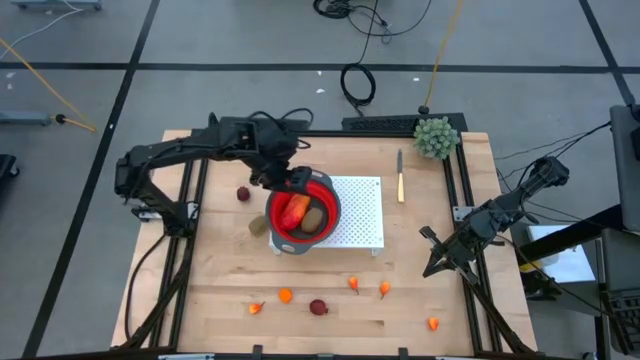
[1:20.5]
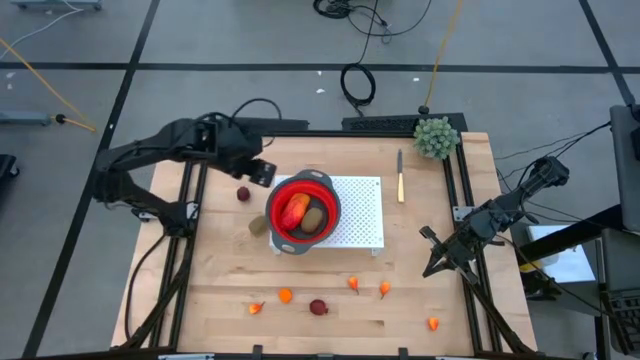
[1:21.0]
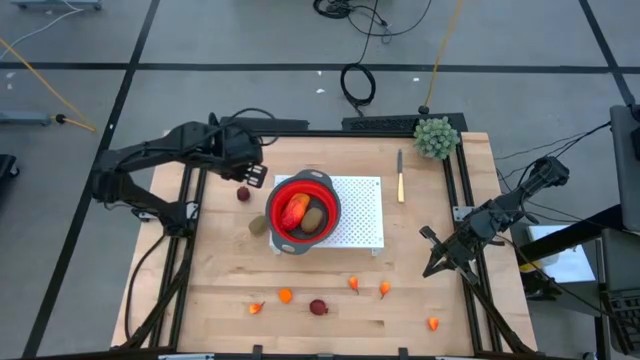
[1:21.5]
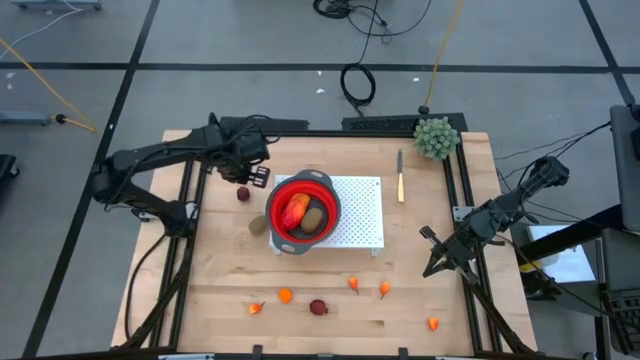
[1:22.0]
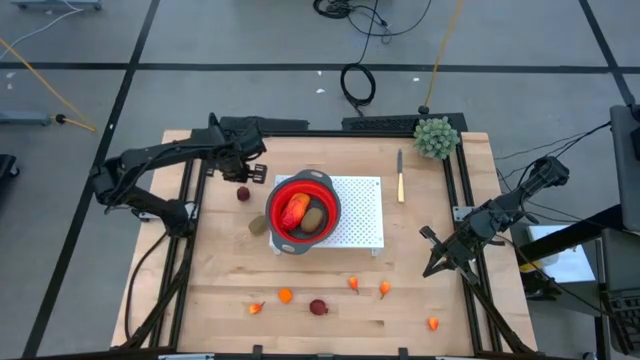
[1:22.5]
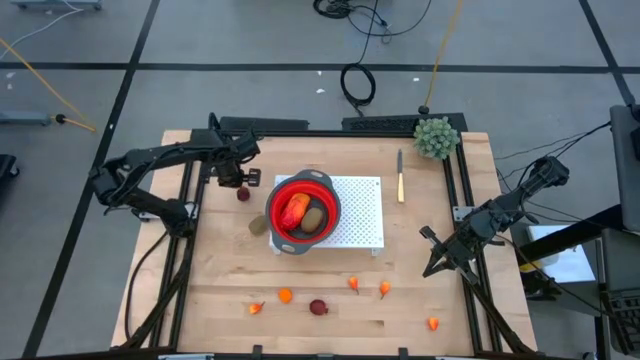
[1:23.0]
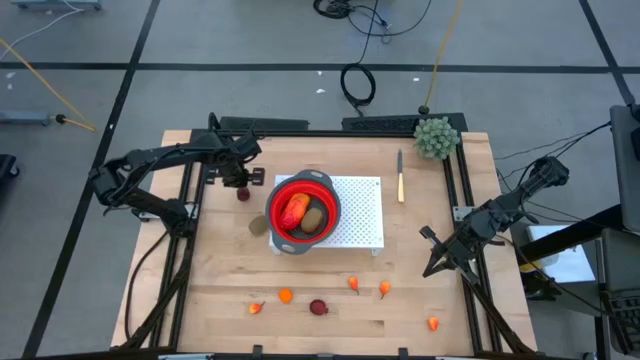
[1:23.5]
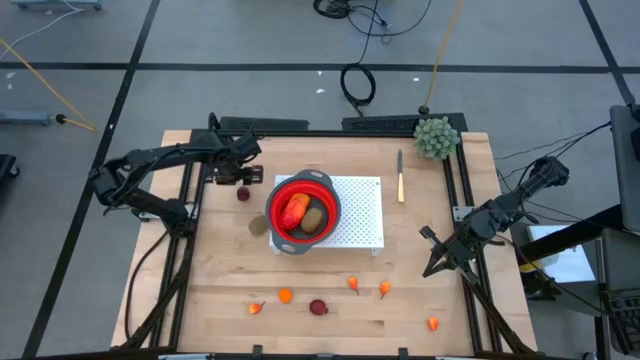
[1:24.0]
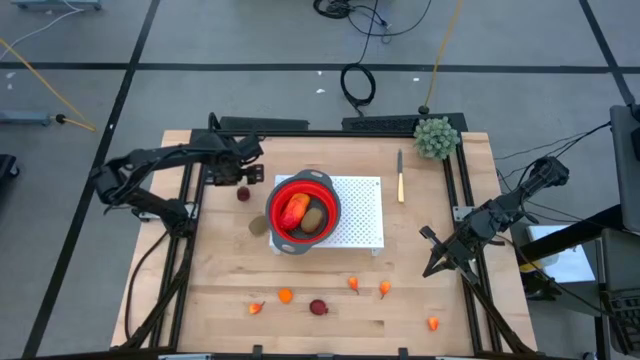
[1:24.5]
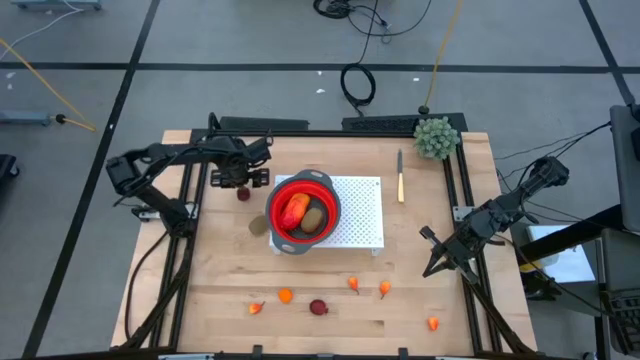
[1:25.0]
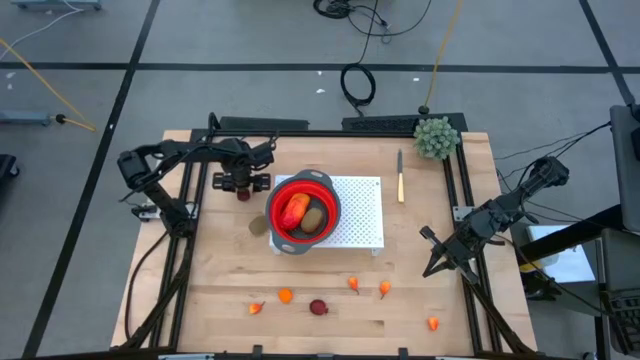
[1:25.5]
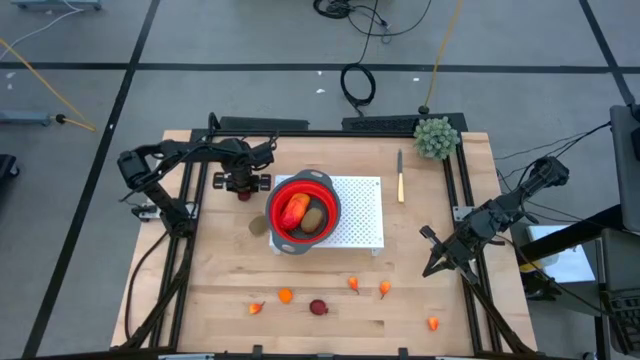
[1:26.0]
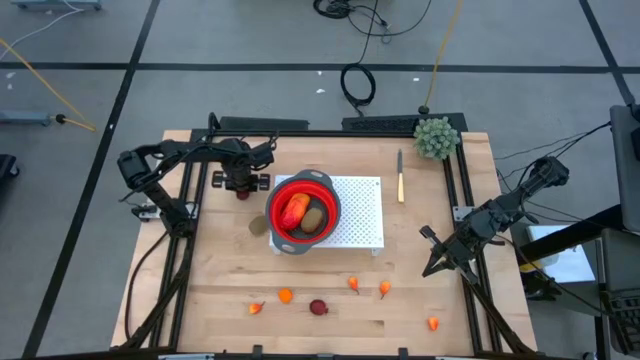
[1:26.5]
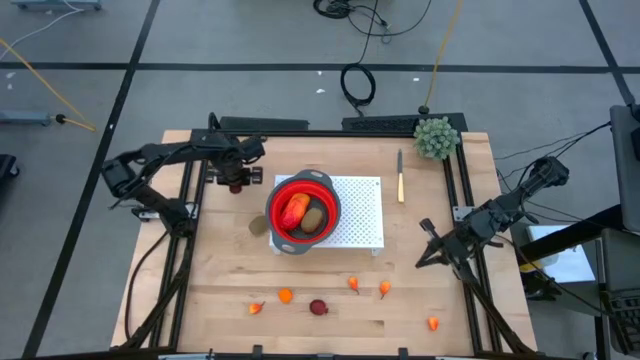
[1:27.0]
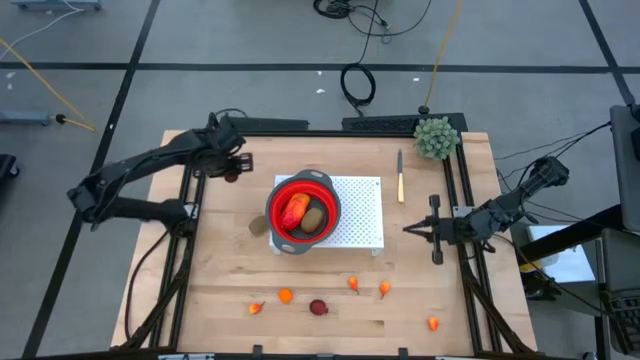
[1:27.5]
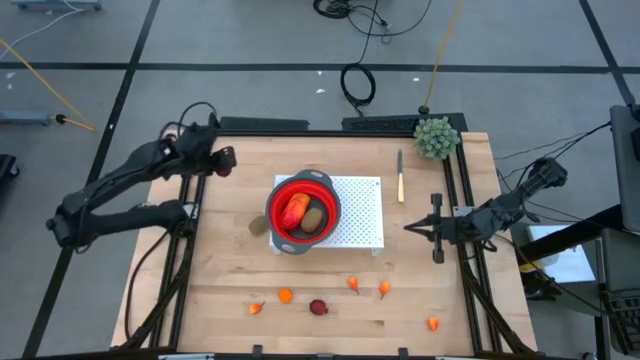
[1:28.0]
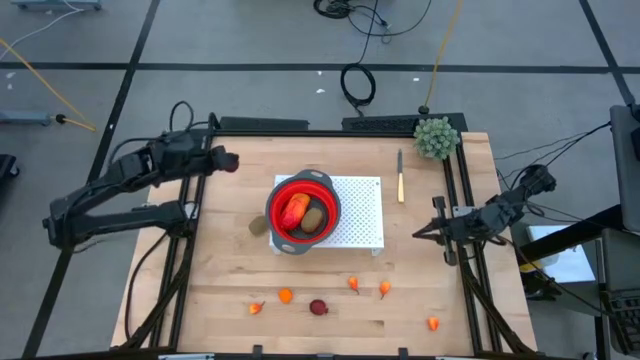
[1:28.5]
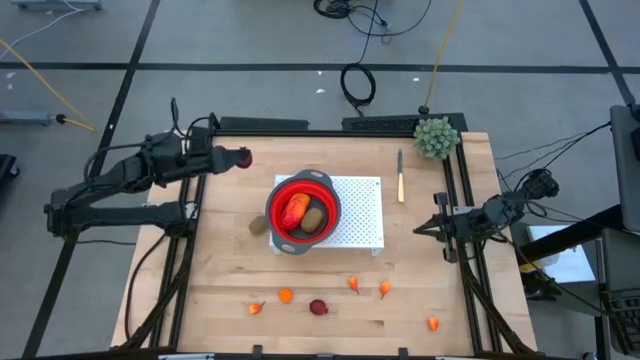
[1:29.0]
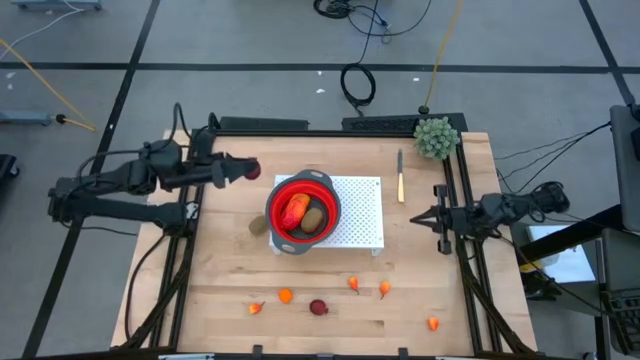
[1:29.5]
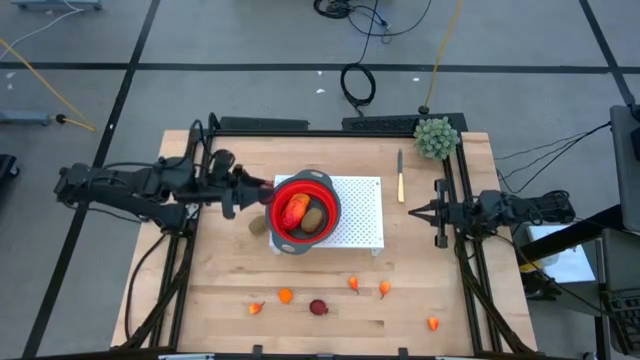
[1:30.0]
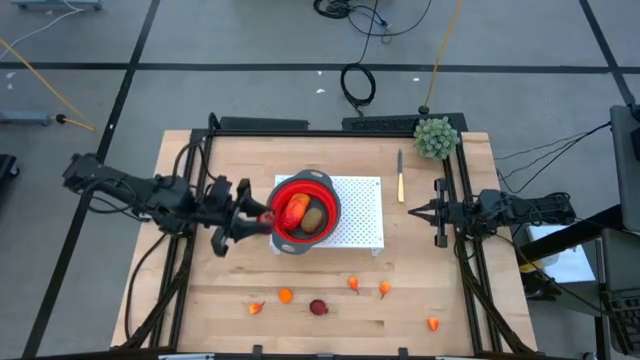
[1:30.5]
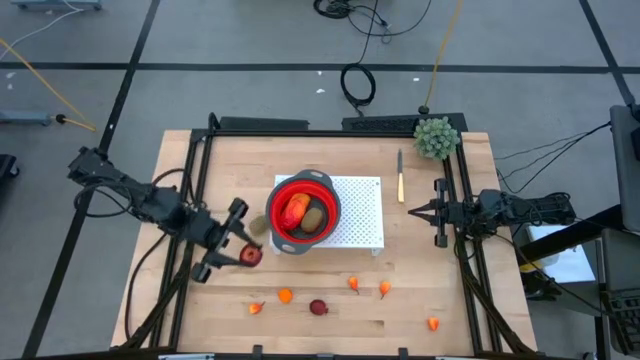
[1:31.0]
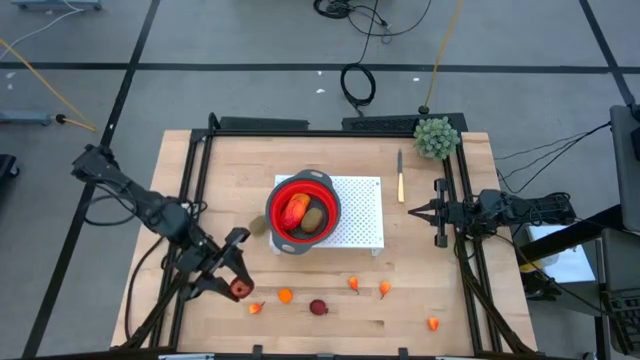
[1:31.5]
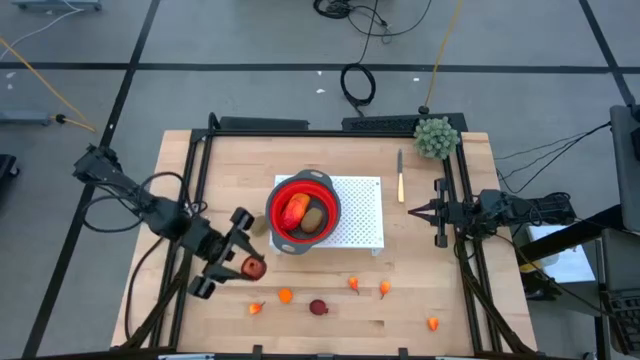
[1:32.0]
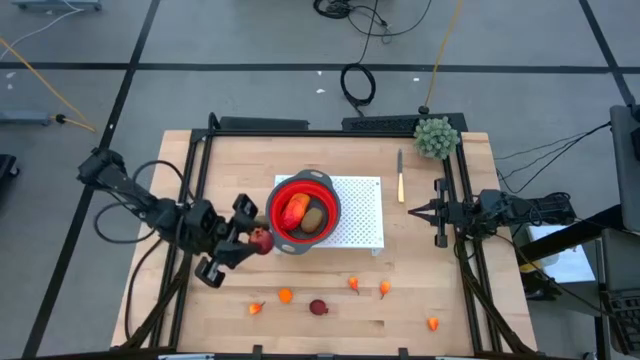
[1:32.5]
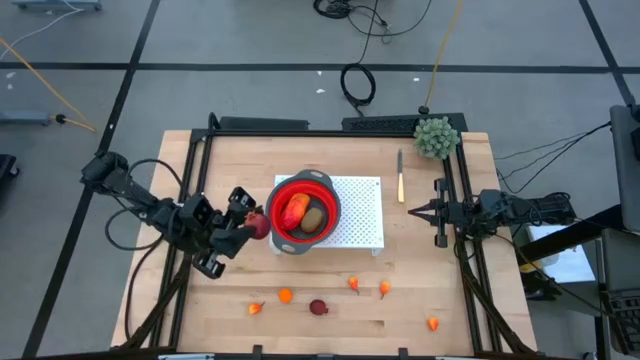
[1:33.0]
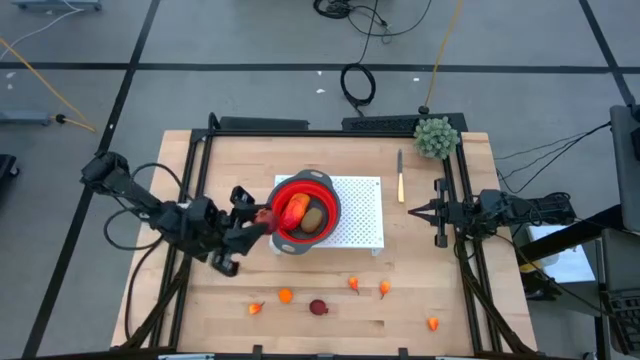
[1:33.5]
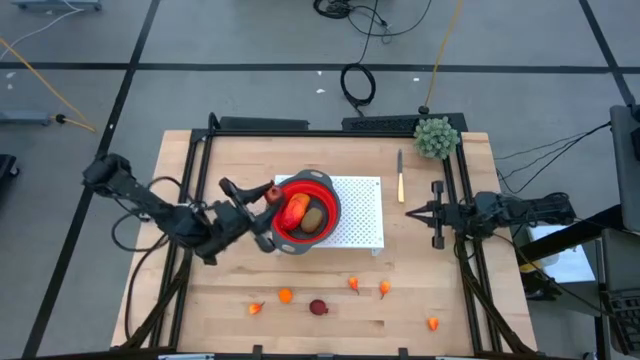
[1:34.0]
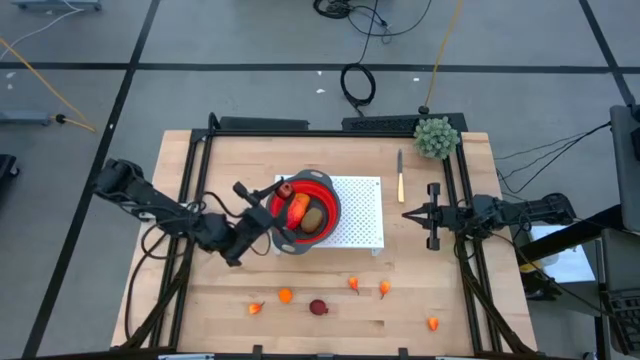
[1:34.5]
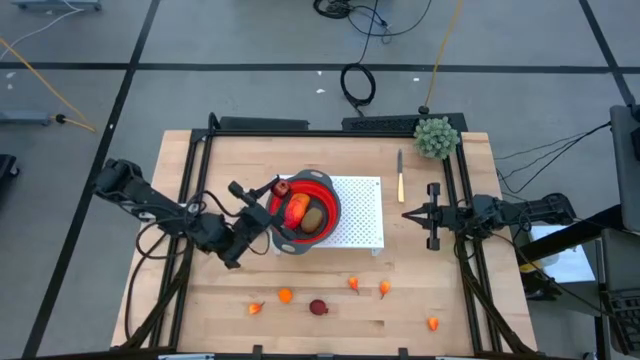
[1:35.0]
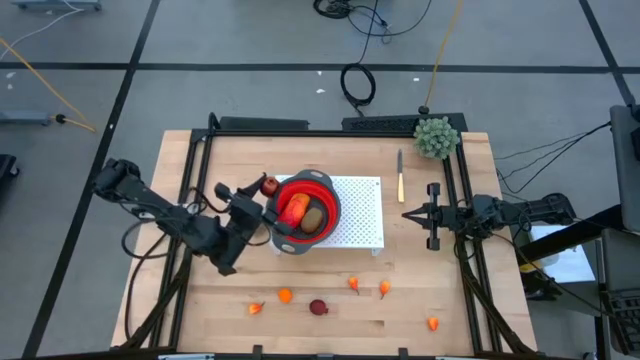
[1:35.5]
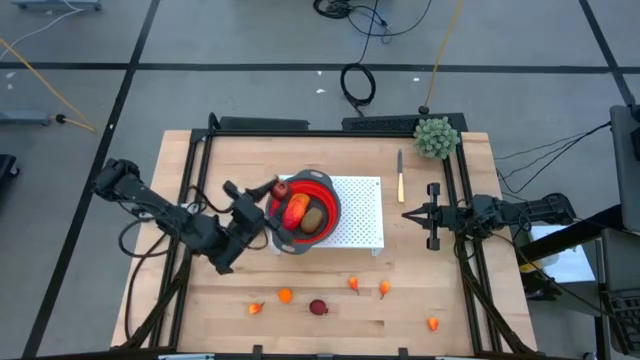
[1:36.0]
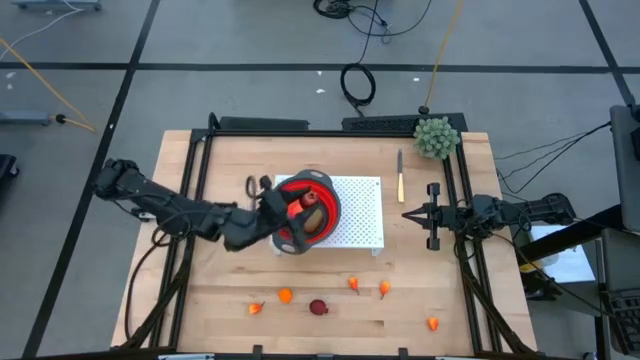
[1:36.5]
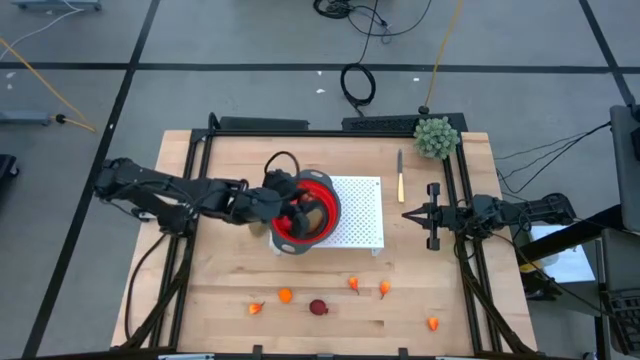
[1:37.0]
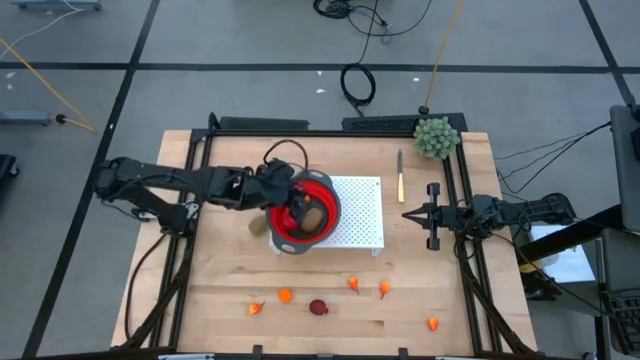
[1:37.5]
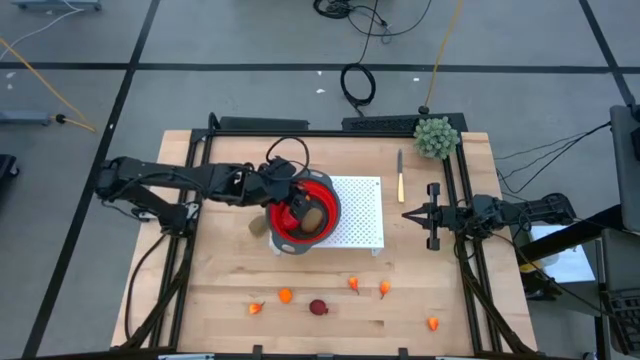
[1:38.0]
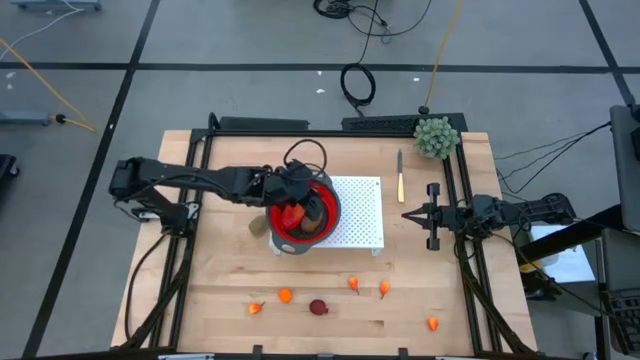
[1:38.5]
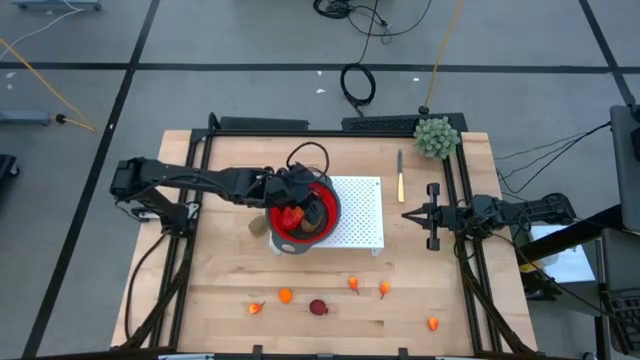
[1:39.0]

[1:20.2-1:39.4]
Task: Pick & Place Fruit
Put the top pomegranate into the strainer bowl on the shelf

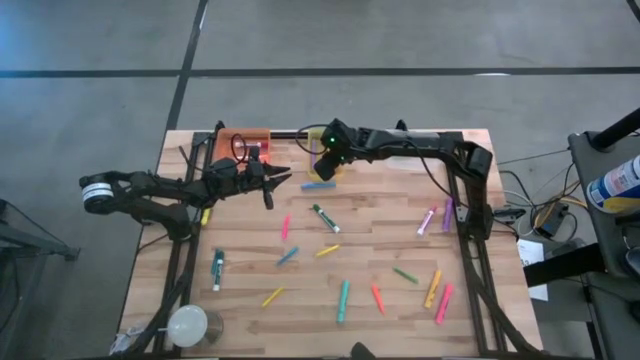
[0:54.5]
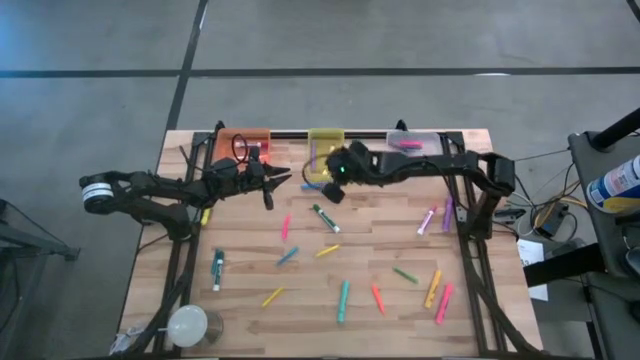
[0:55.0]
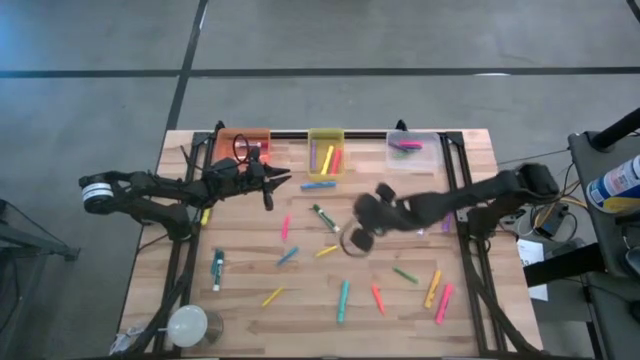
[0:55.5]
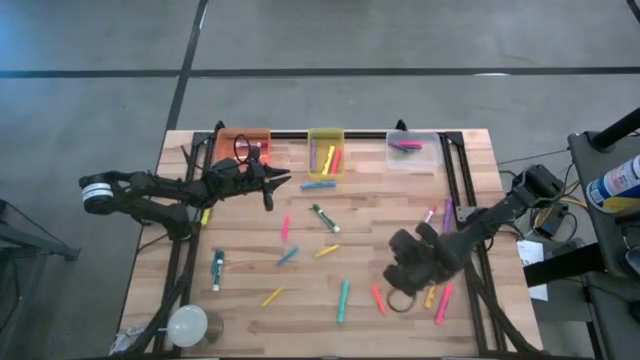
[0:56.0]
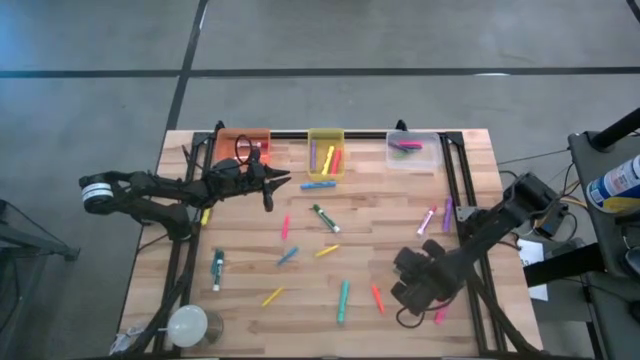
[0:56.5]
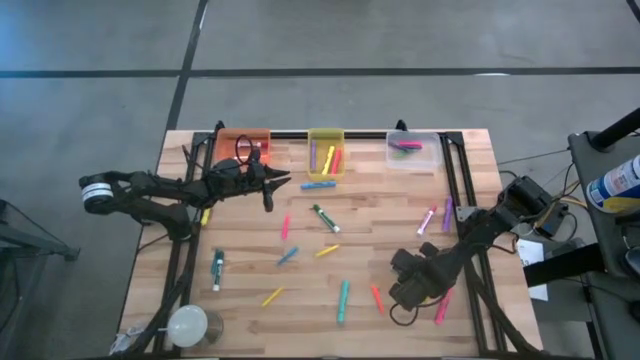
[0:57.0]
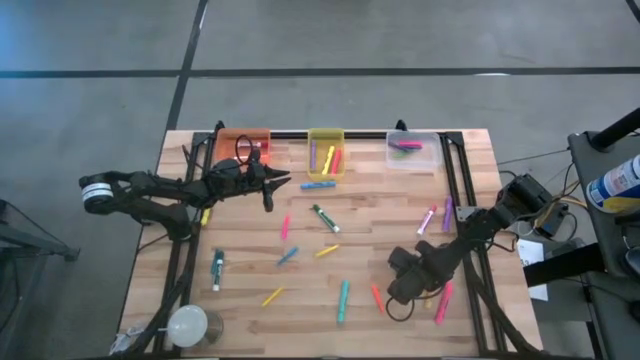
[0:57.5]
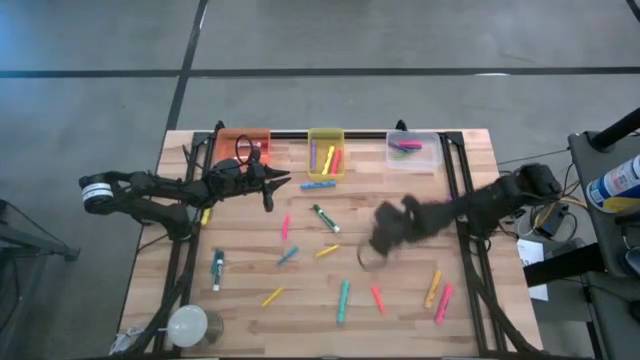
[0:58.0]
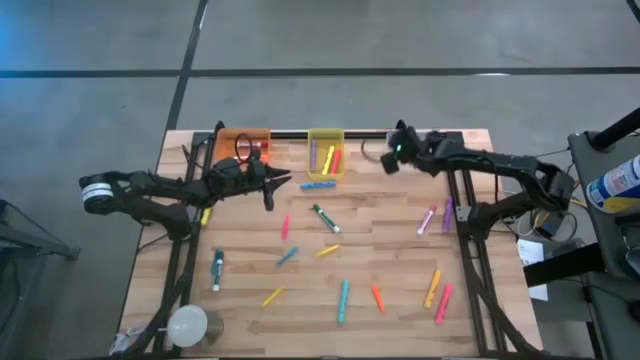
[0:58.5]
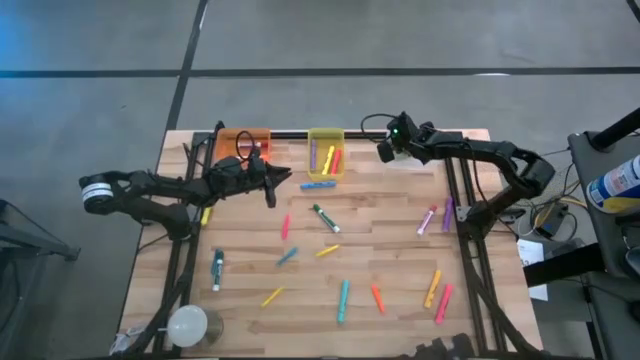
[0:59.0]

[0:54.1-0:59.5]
Task: Pick & Place Markers
Put the green pen into the transparent bin
